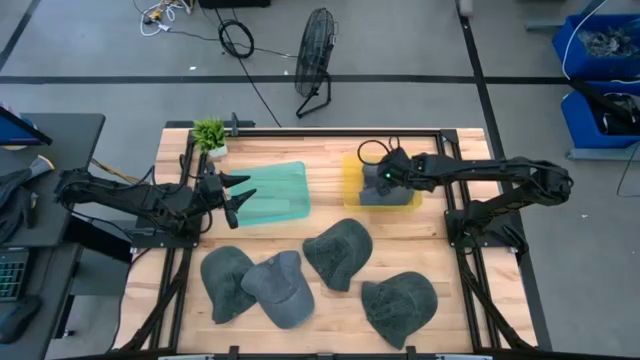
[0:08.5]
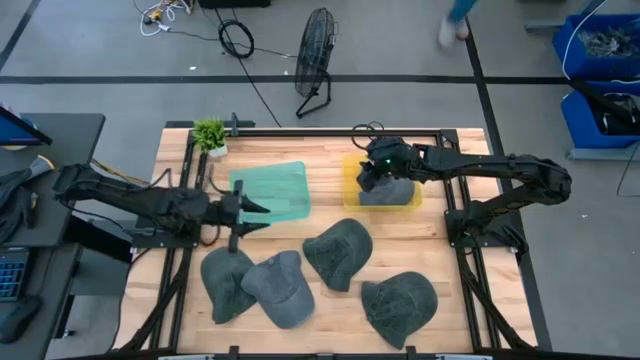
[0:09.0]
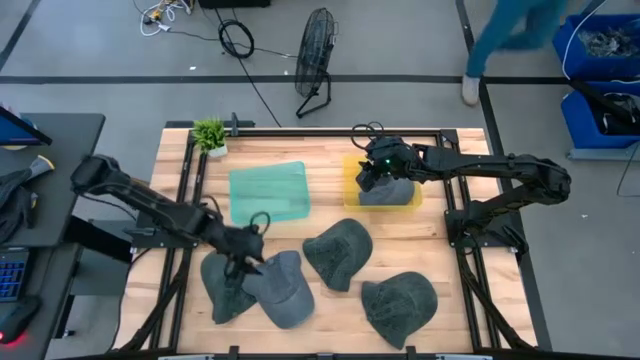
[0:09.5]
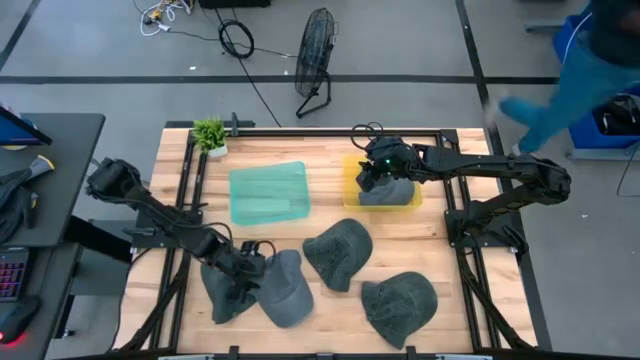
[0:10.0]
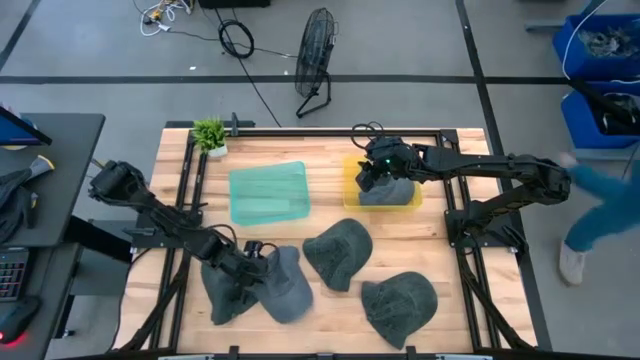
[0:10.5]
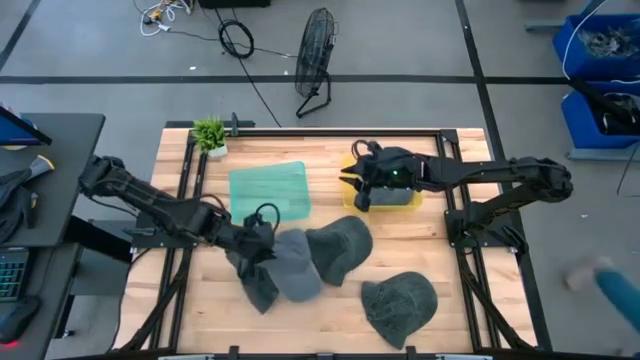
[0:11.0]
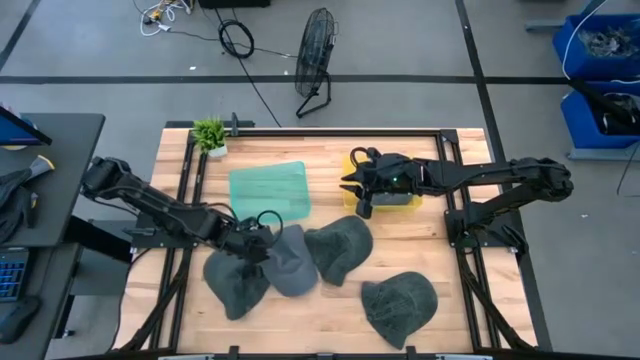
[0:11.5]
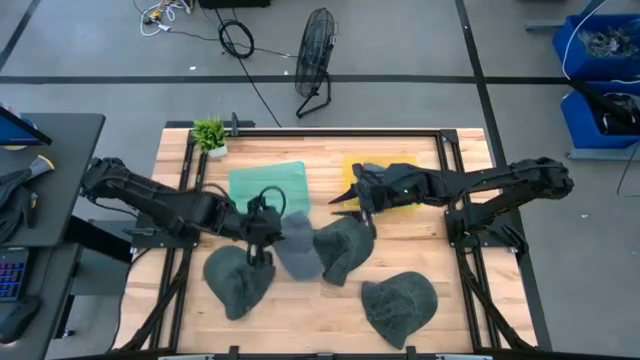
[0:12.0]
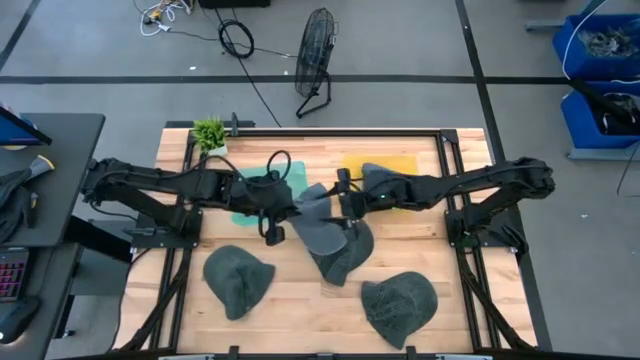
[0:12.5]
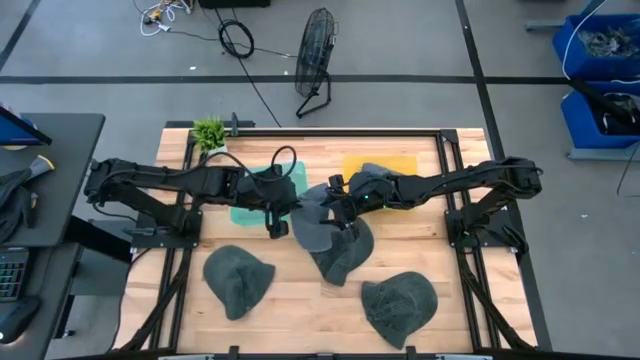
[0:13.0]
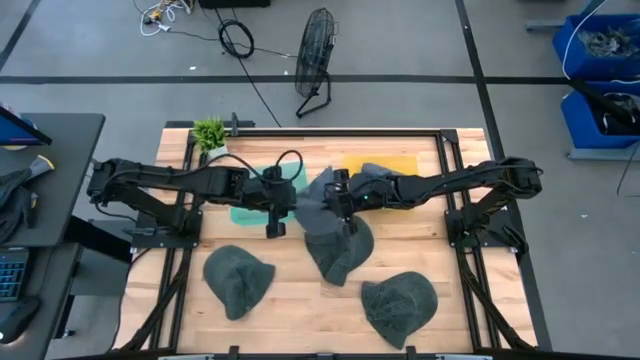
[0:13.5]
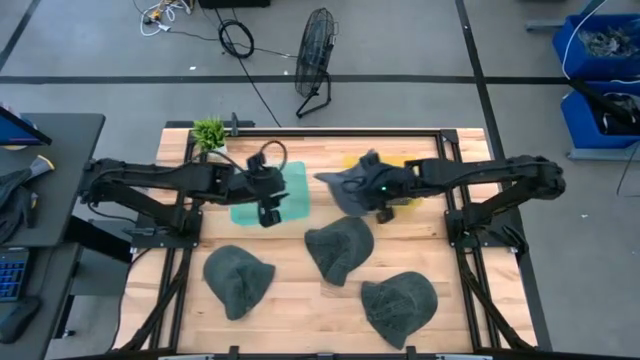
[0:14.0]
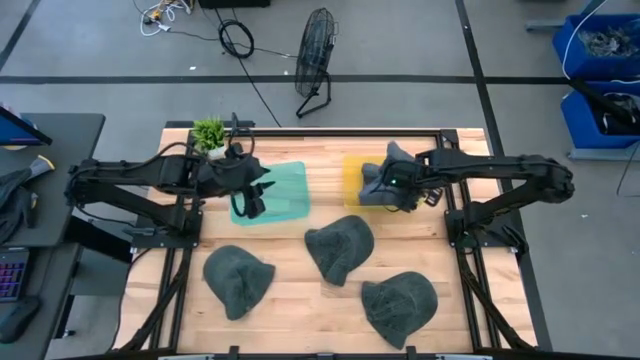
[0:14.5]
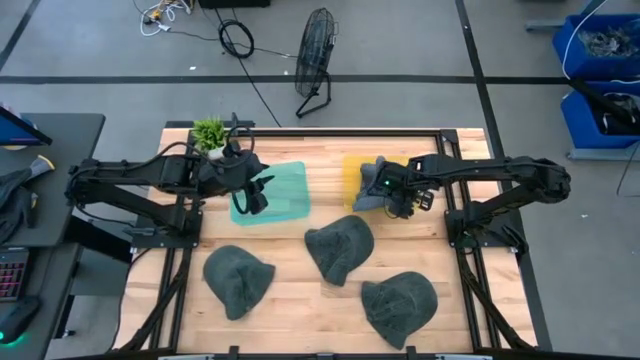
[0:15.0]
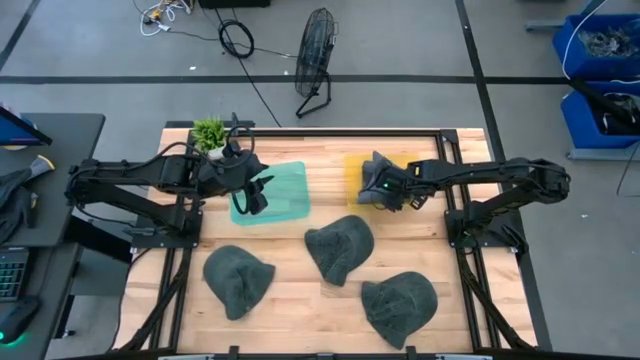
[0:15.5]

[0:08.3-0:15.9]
Task: Pick & Place hat
Put the dark blue cap into the yellow bin

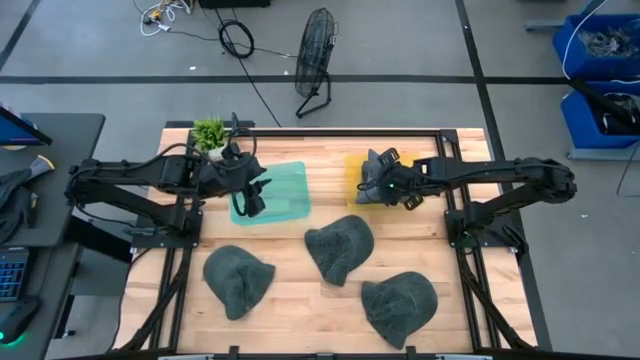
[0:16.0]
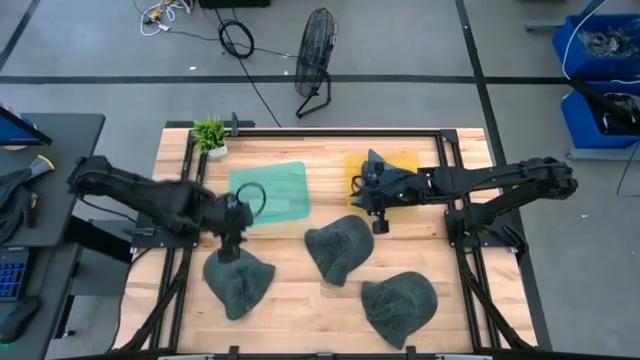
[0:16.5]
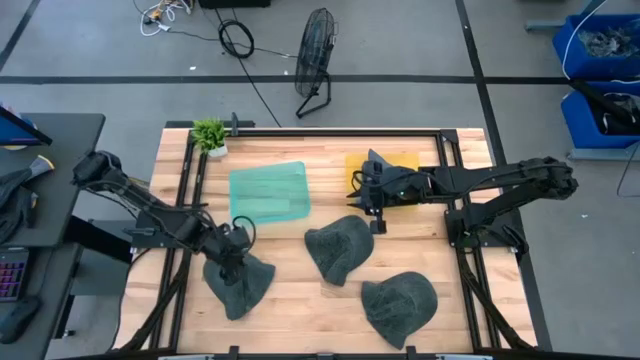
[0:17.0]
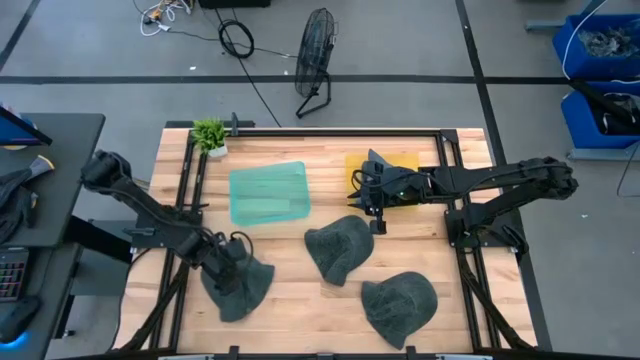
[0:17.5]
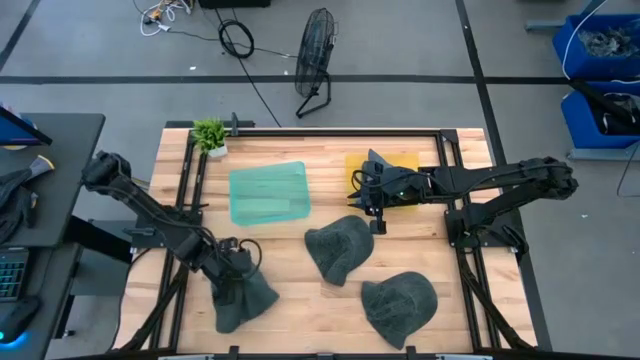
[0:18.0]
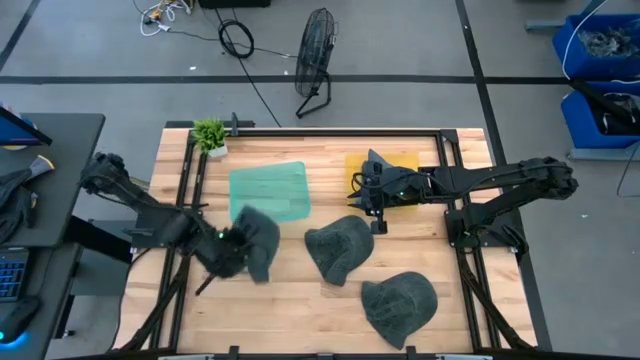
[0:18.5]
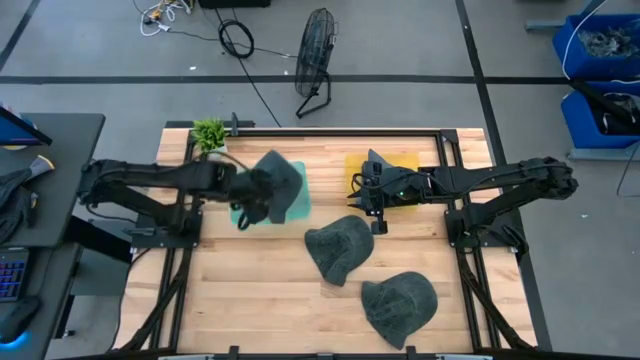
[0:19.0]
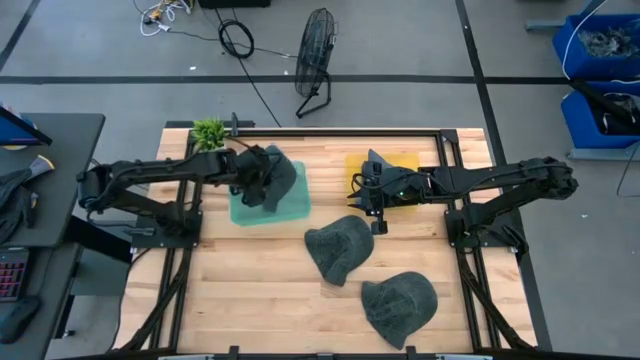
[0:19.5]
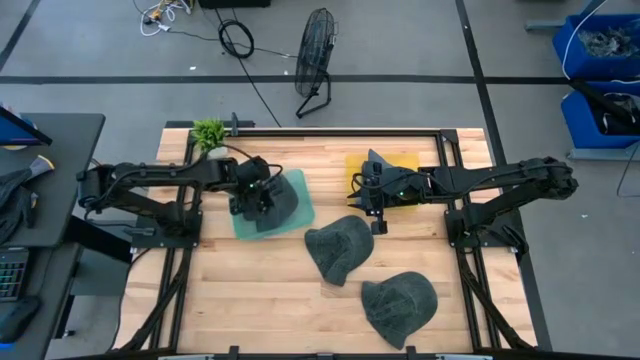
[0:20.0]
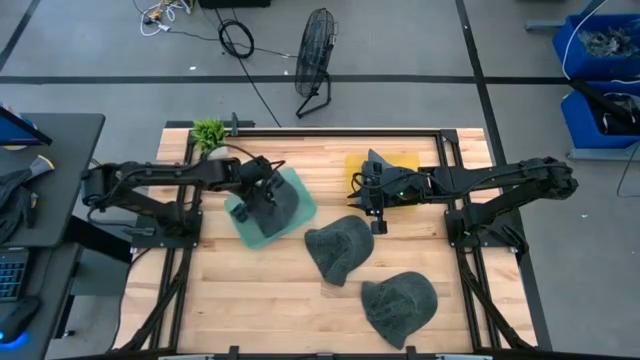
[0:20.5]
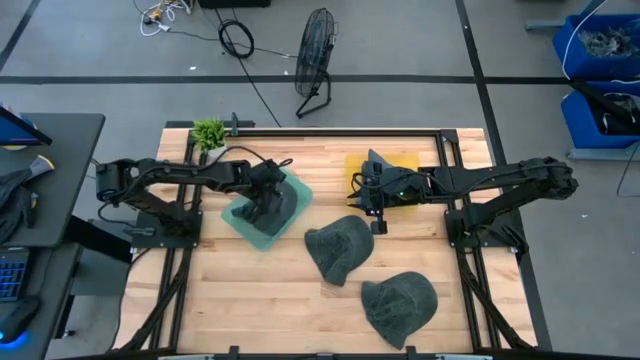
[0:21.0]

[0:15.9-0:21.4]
Put the black cap into the green bin

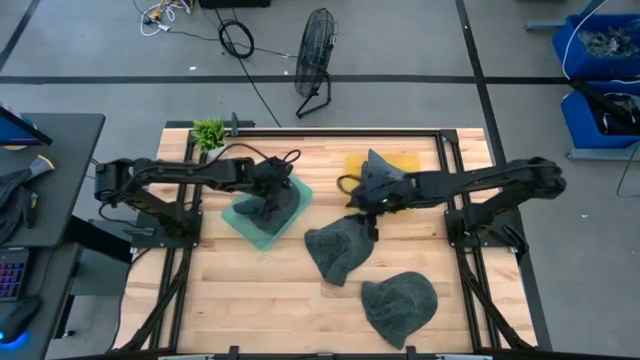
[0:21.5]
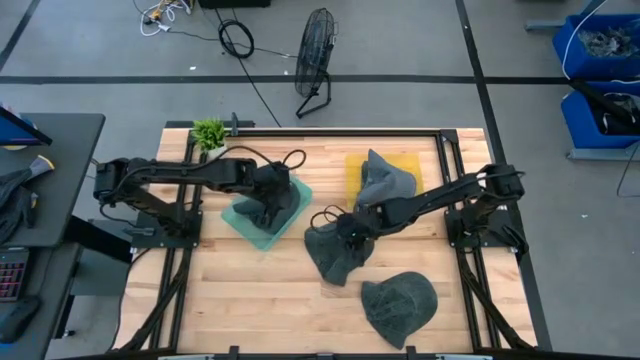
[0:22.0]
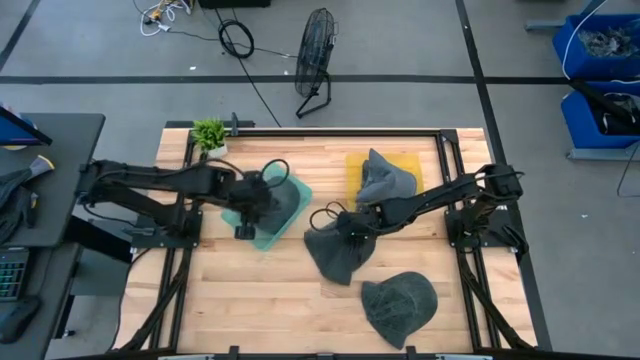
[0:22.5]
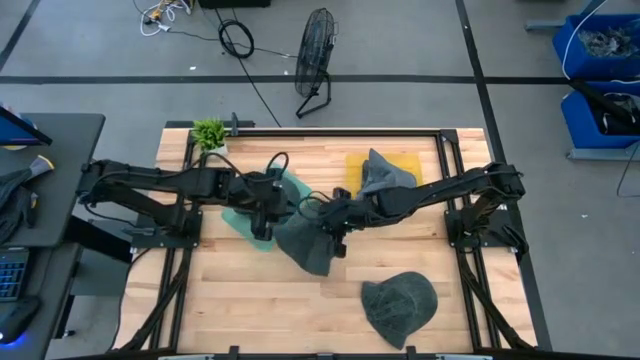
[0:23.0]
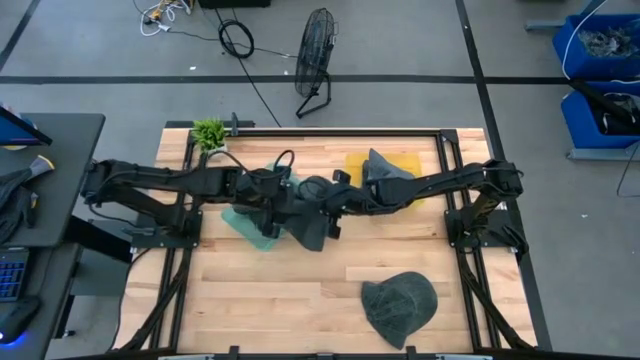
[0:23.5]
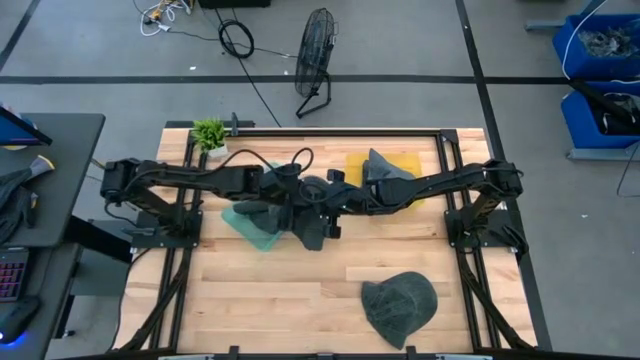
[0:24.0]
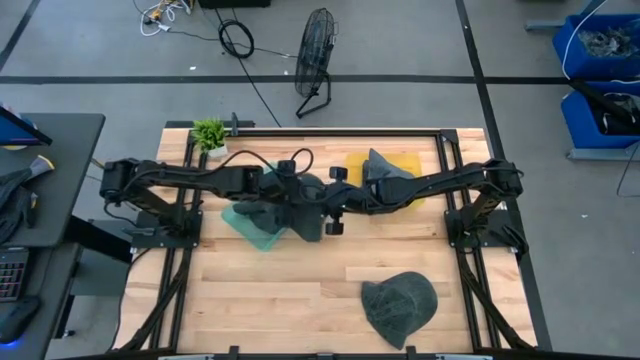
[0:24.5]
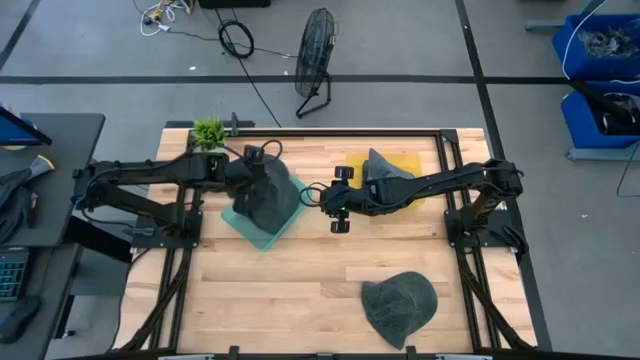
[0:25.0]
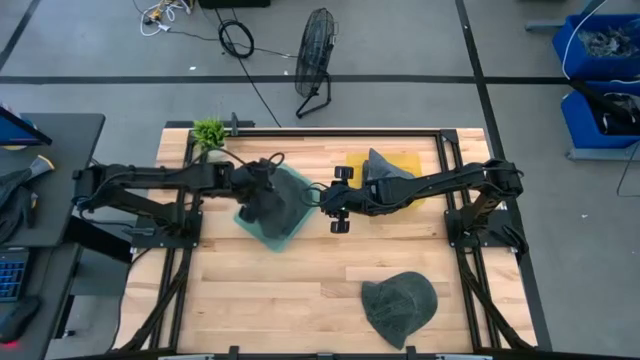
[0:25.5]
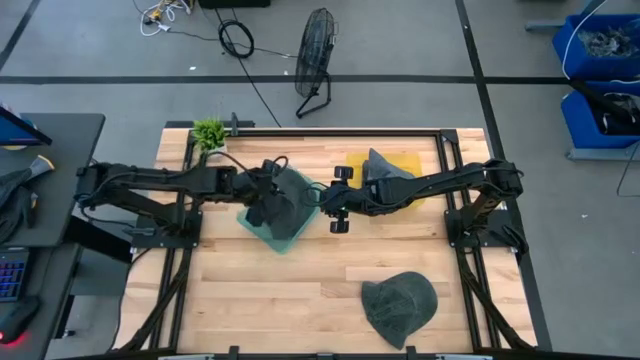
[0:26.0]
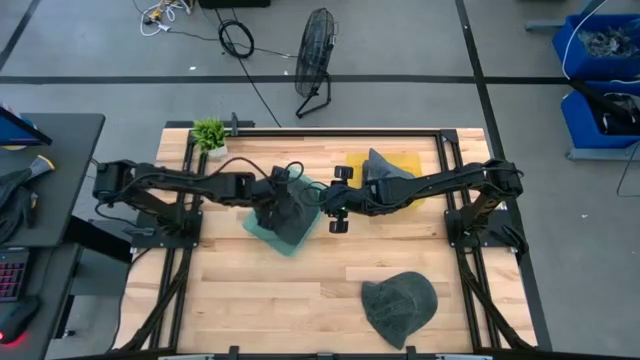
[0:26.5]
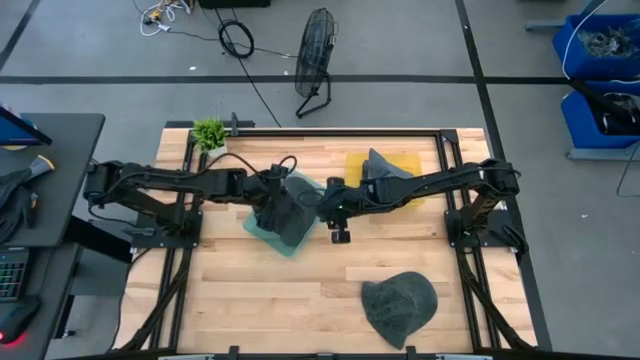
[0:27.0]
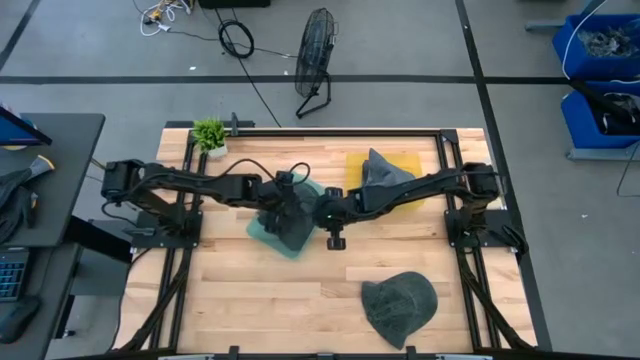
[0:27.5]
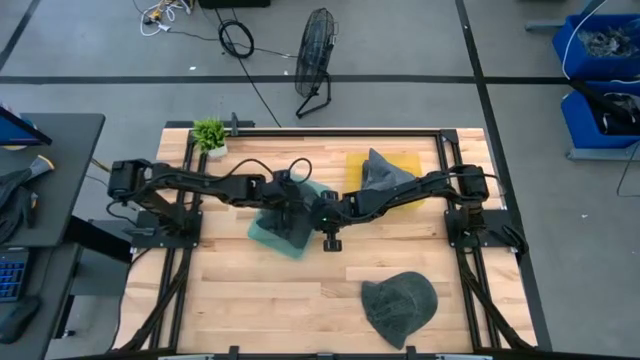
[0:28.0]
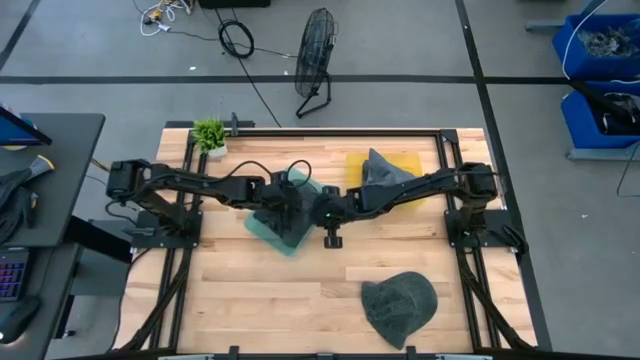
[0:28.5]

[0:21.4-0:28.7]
Put the black cap into the green bin

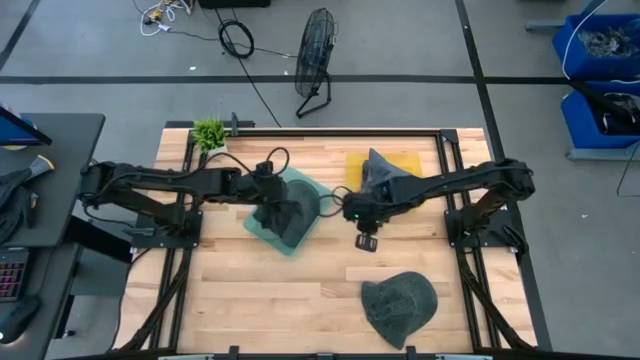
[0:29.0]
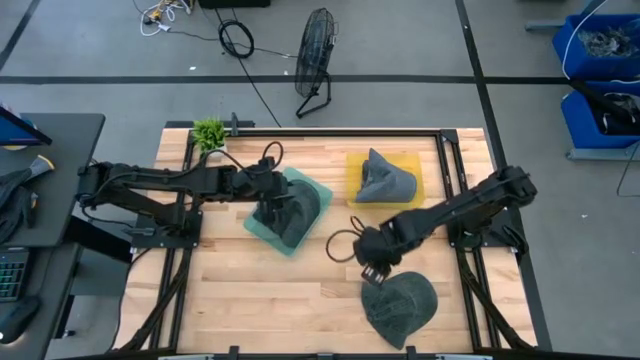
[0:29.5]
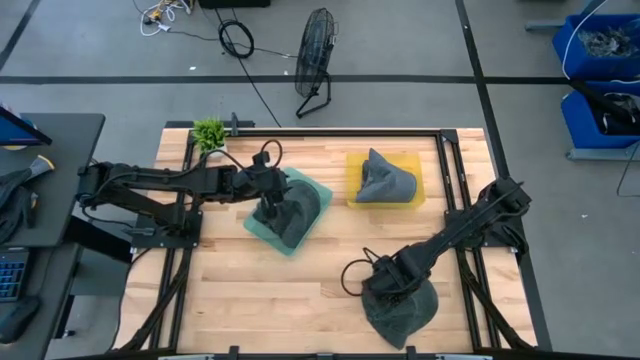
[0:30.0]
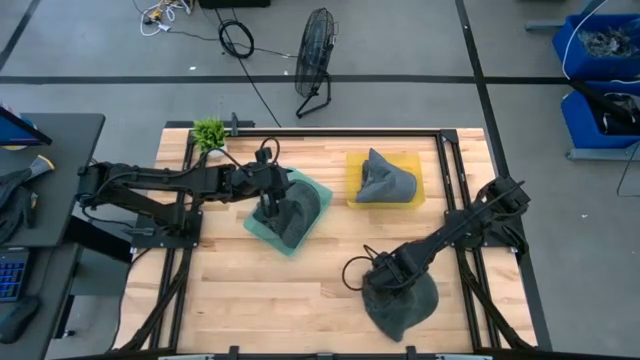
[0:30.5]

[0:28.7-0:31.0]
Put the black cap into the green bin
